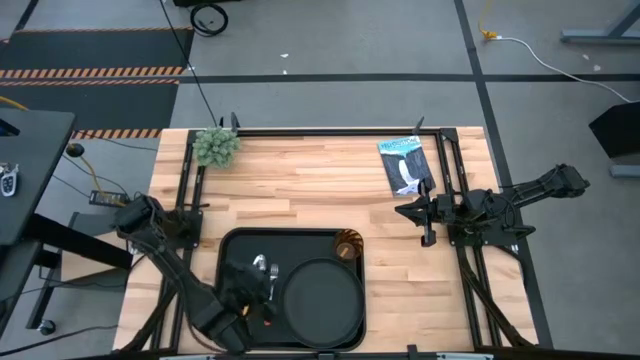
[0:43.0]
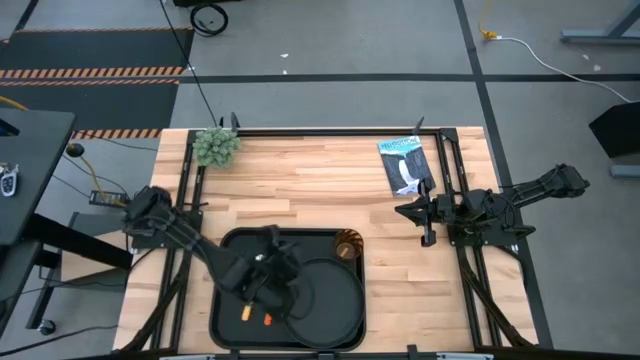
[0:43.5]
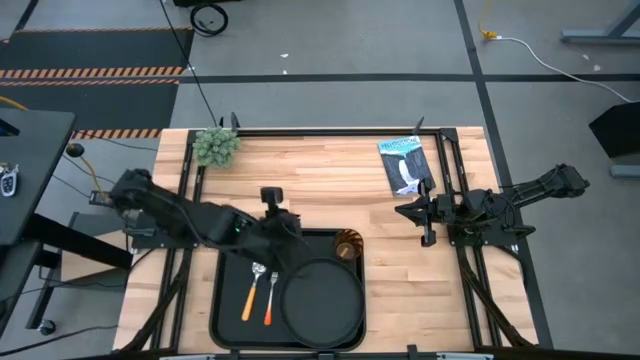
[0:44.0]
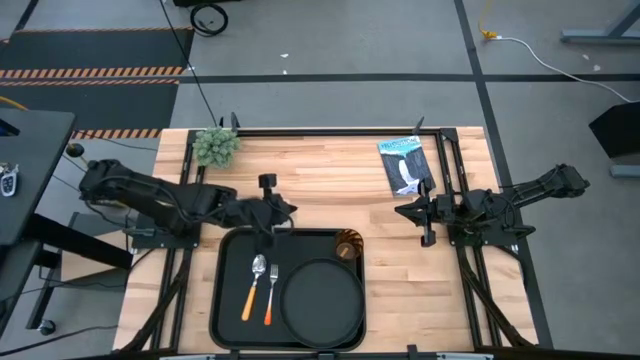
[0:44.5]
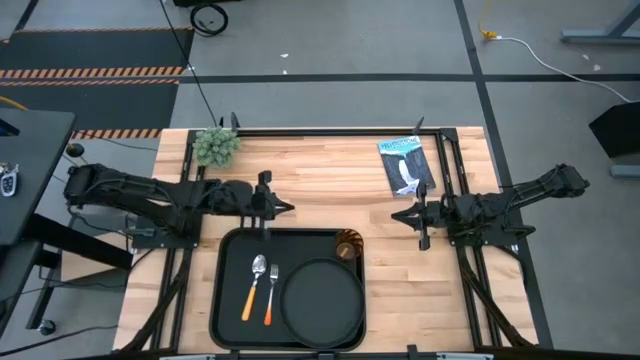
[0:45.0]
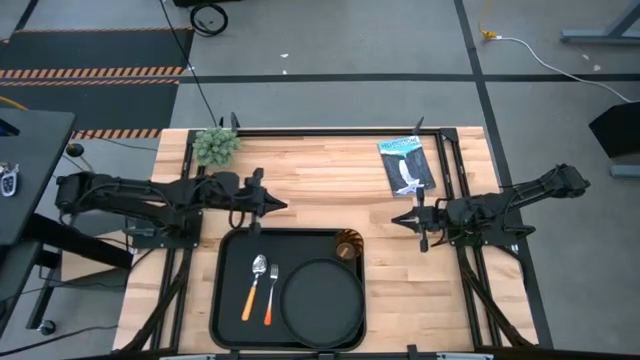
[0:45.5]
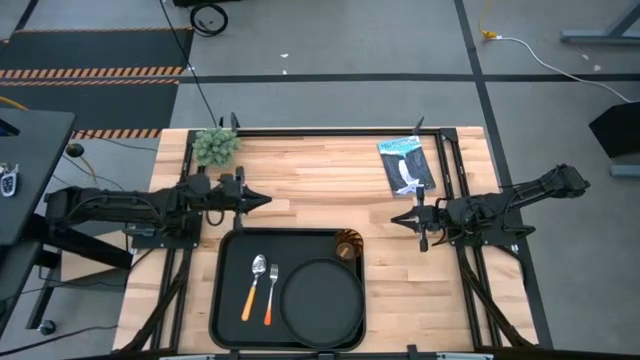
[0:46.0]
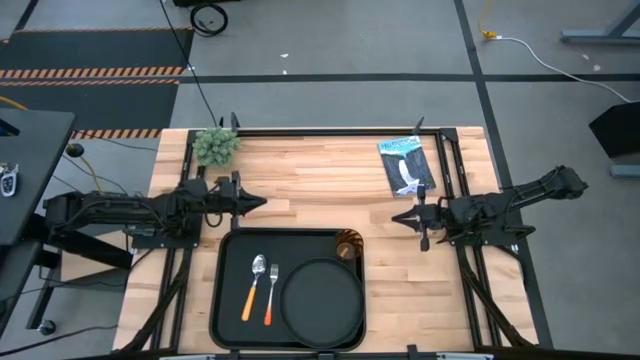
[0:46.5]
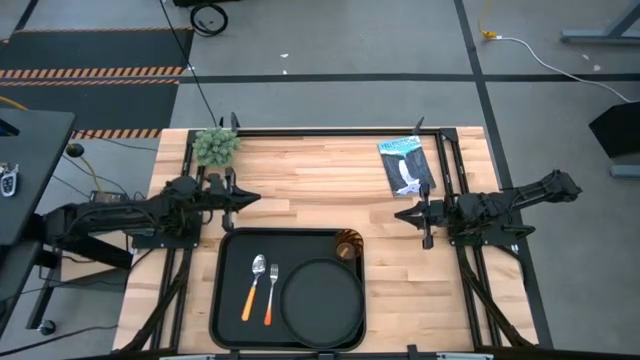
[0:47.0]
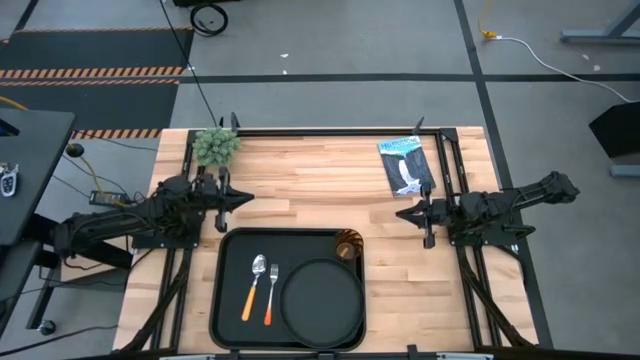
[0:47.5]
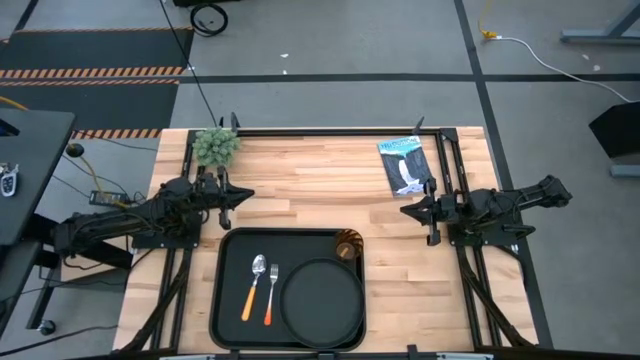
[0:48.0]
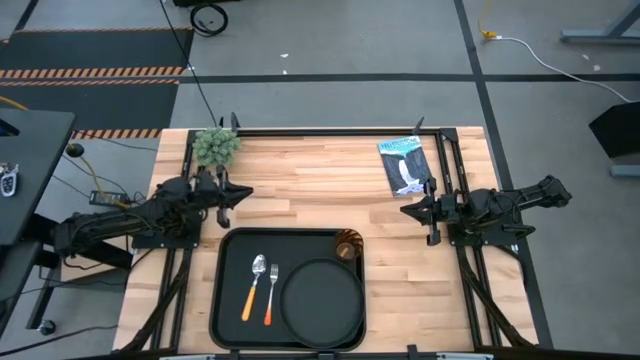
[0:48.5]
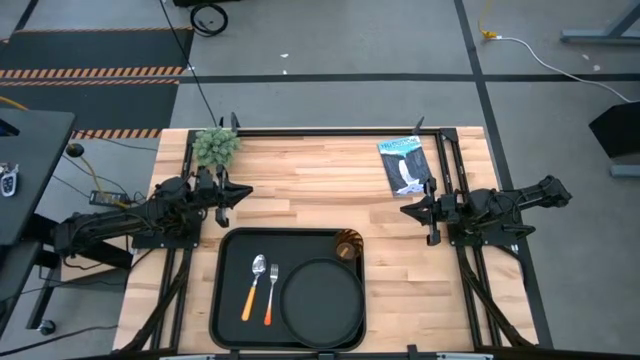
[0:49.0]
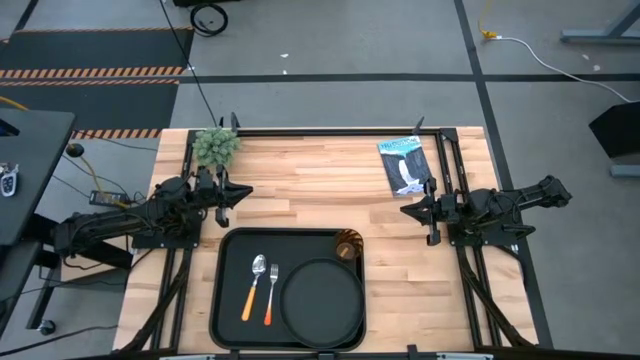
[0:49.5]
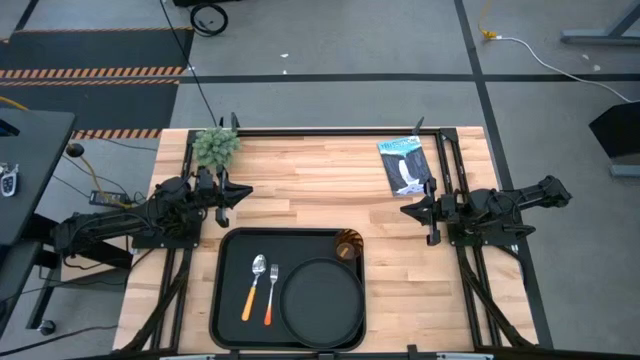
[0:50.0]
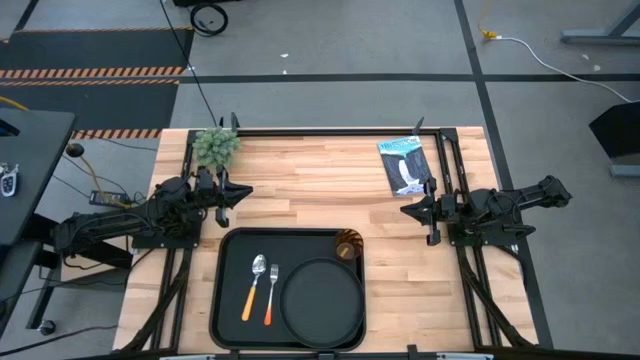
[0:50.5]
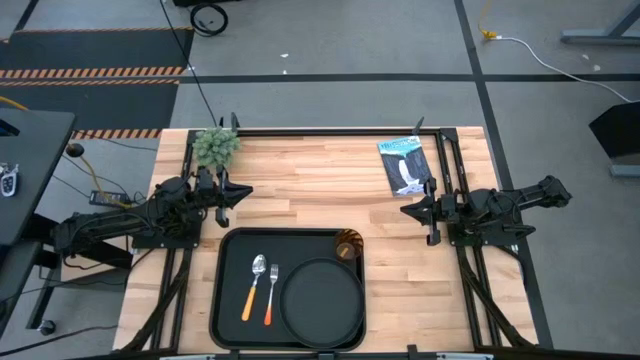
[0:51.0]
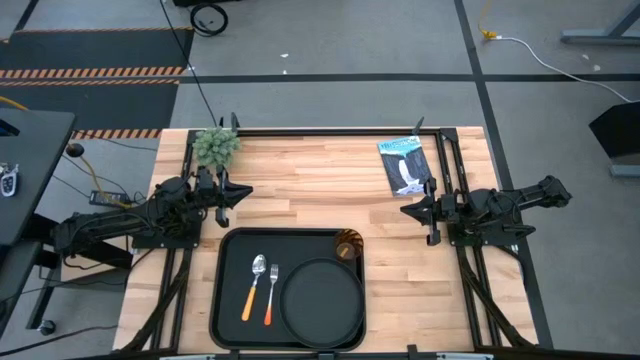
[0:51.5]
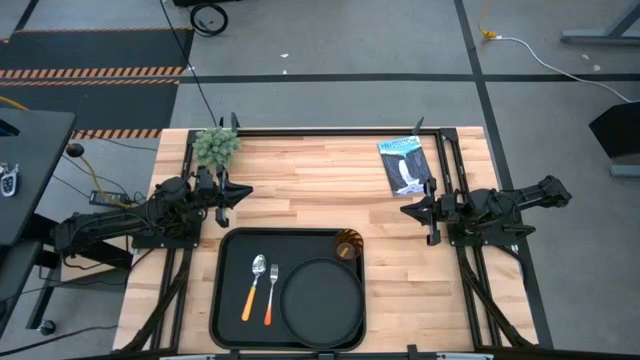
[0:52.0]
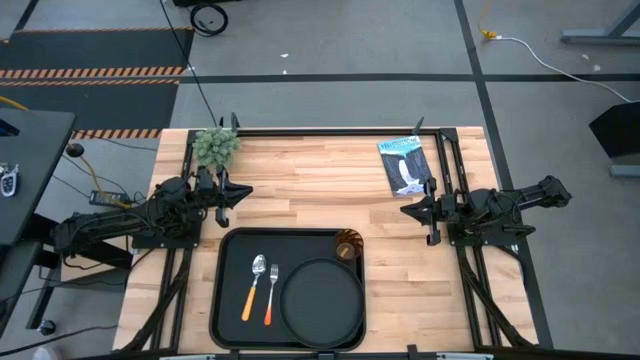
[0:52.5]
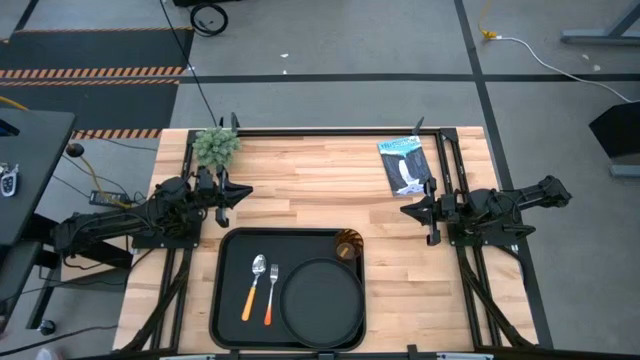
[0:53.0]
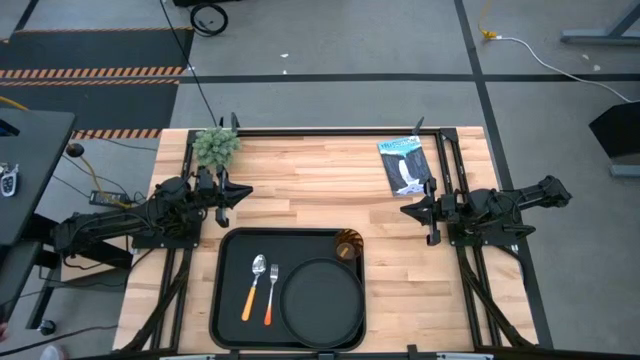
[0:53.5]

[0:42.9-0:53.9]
Task: Pick and place plate/cup/fork/spoon on tray
Return to Home Position

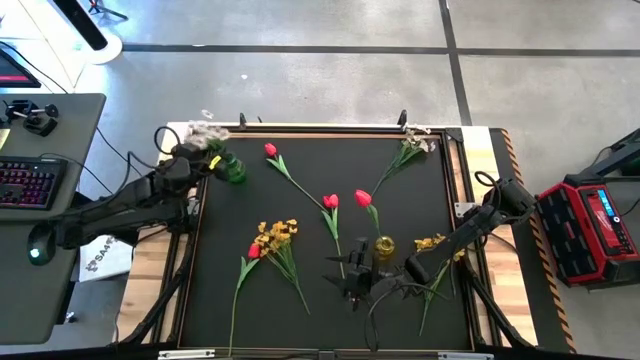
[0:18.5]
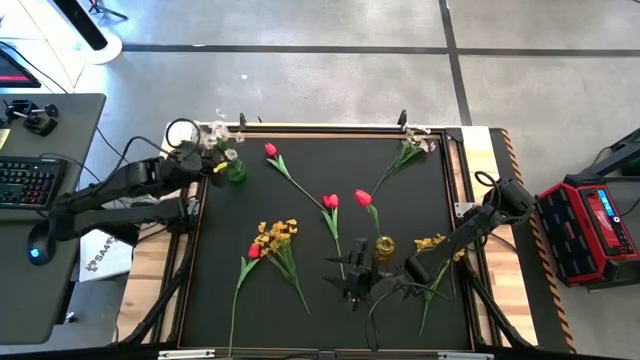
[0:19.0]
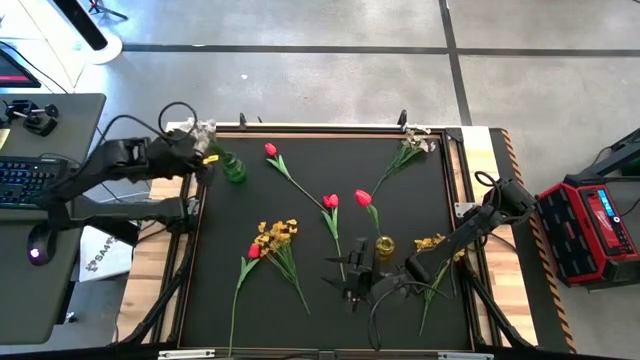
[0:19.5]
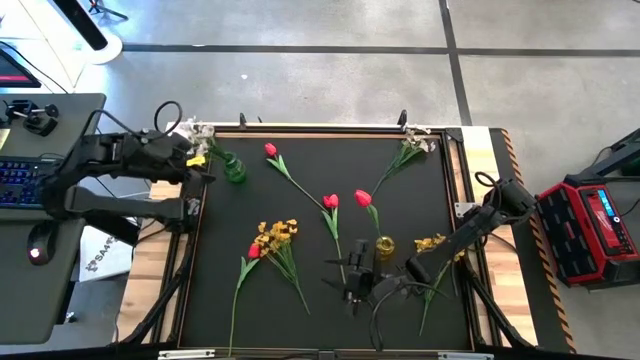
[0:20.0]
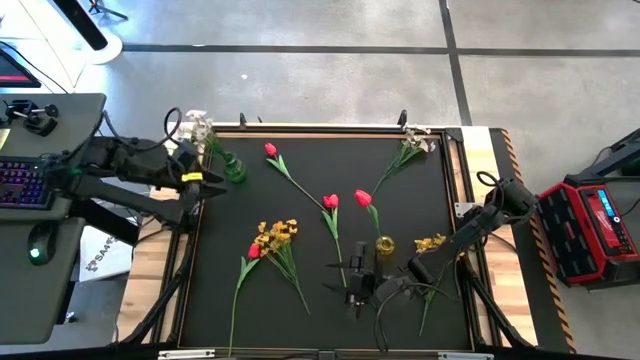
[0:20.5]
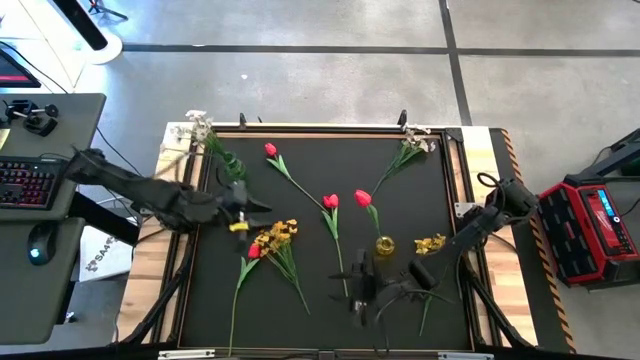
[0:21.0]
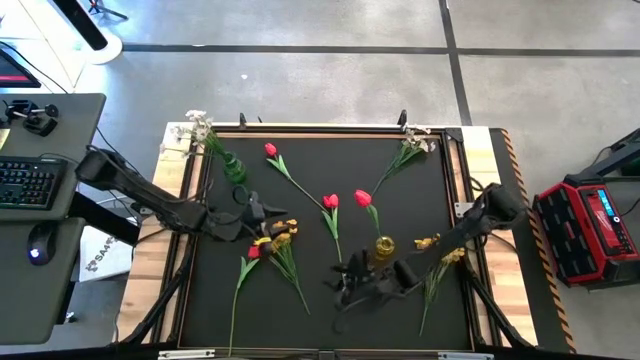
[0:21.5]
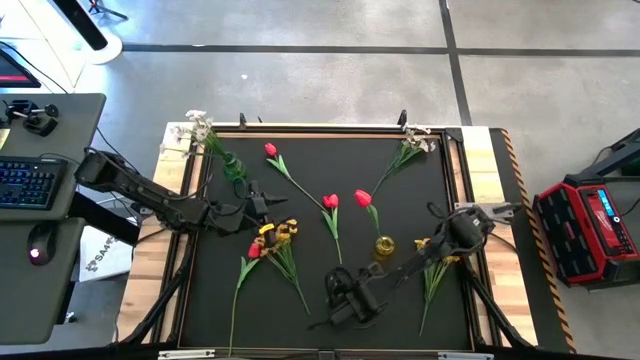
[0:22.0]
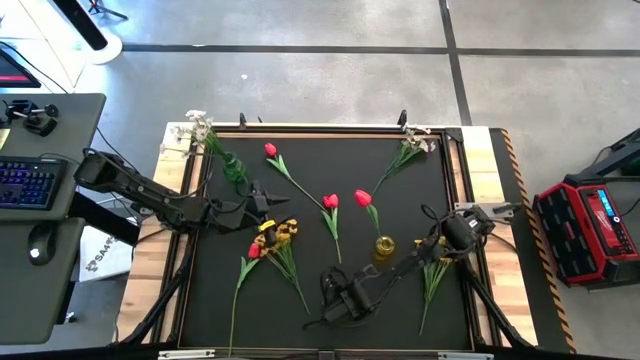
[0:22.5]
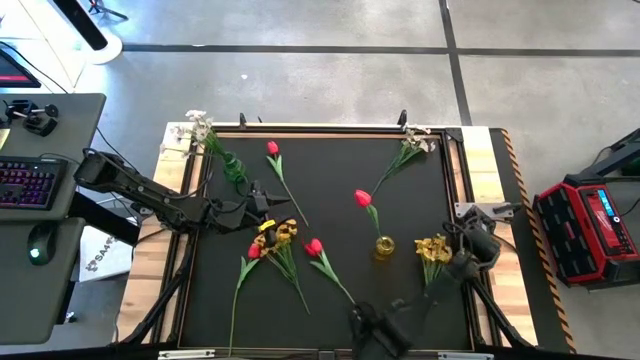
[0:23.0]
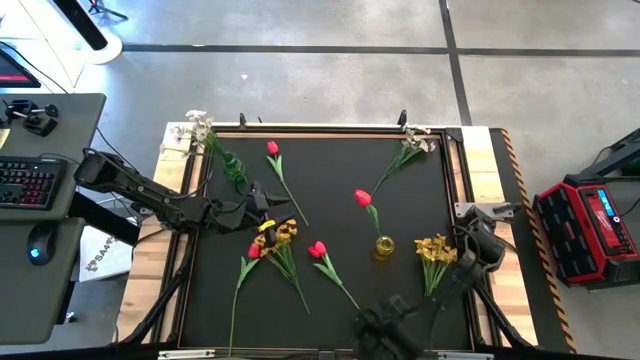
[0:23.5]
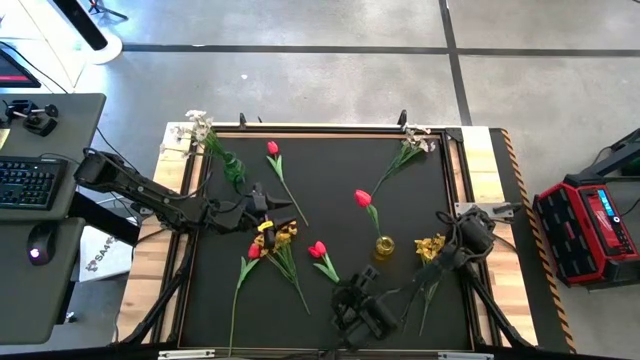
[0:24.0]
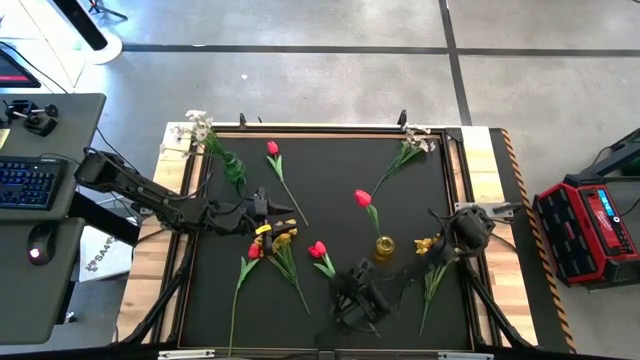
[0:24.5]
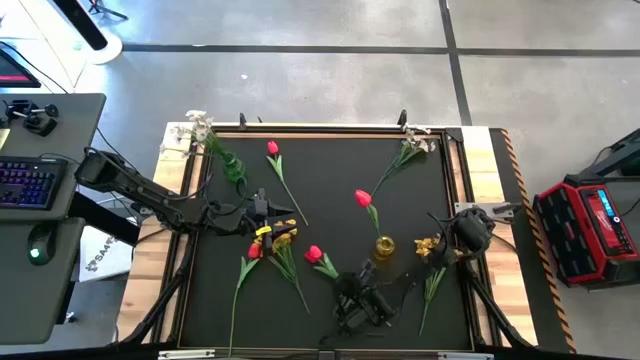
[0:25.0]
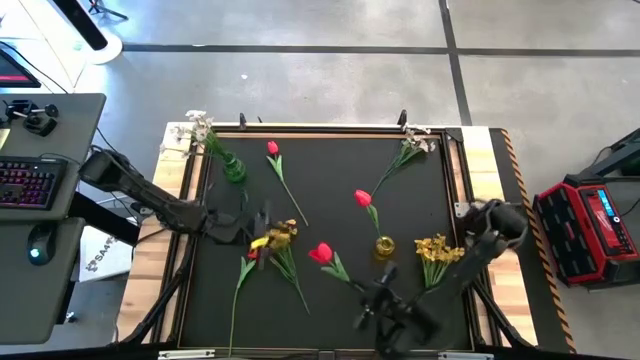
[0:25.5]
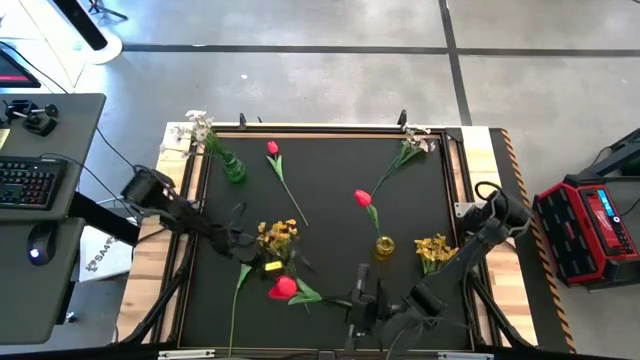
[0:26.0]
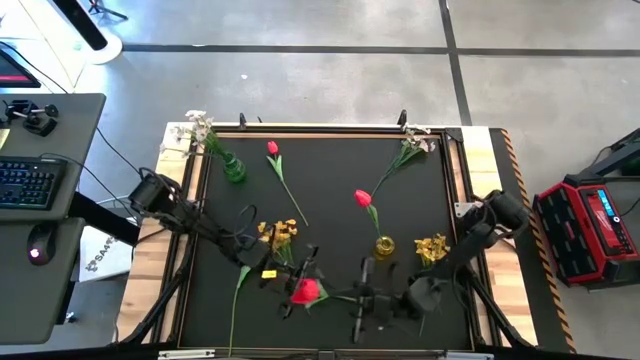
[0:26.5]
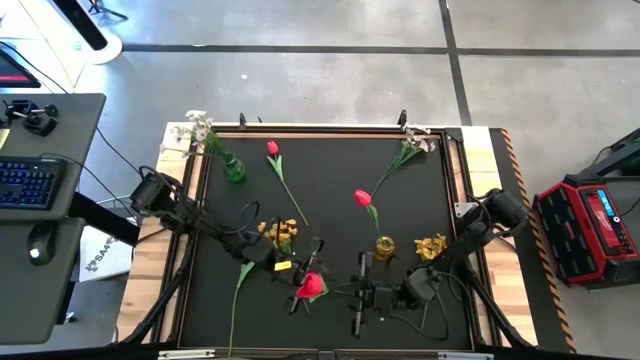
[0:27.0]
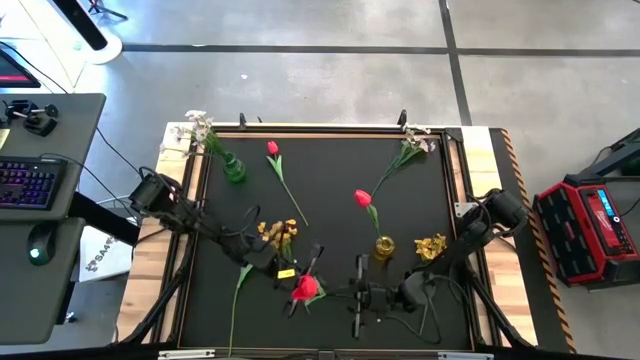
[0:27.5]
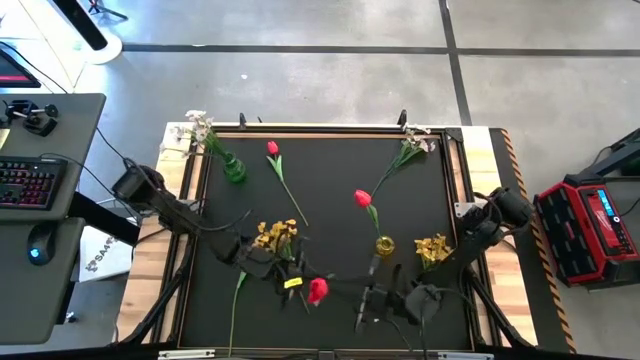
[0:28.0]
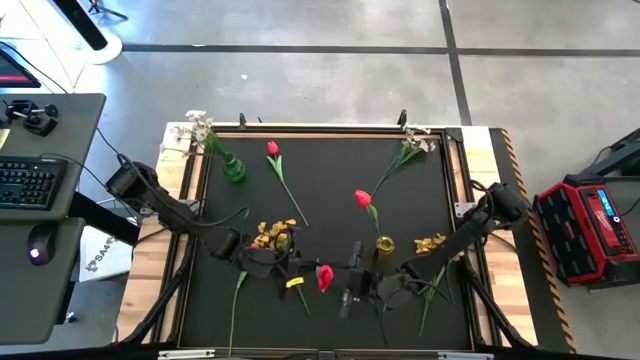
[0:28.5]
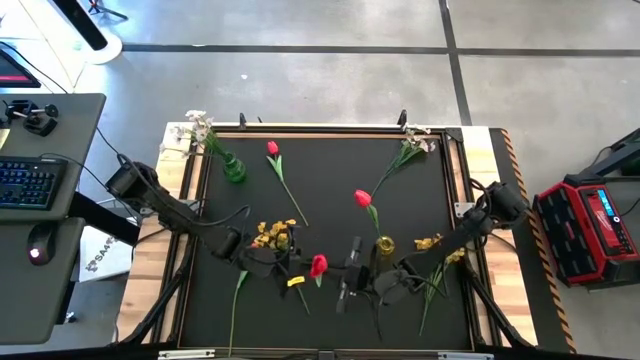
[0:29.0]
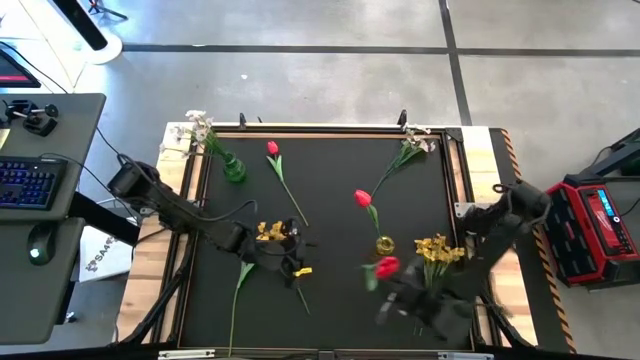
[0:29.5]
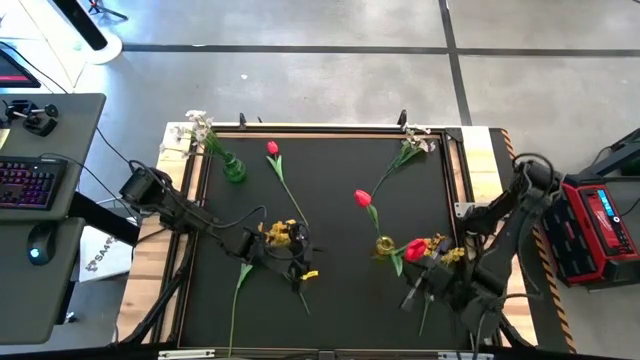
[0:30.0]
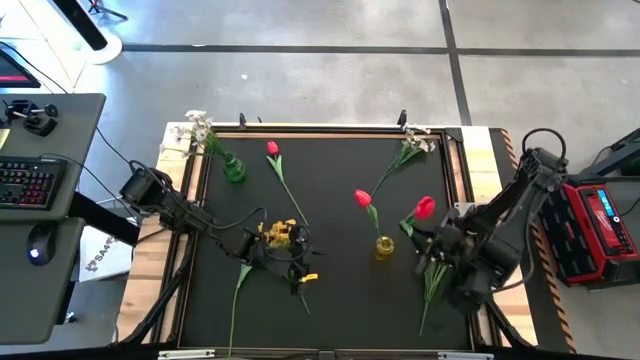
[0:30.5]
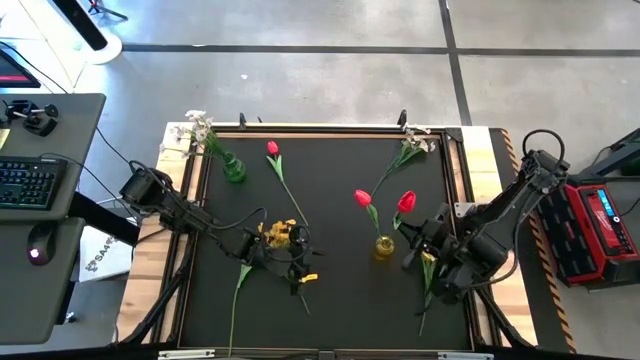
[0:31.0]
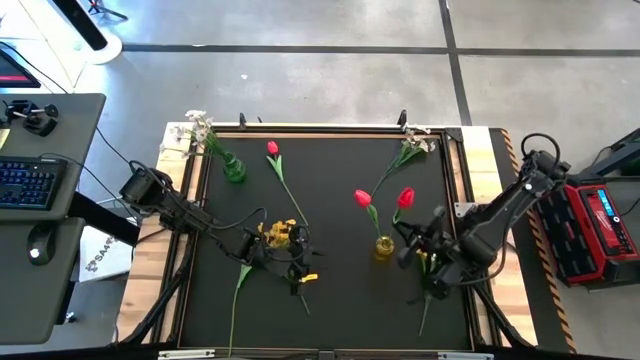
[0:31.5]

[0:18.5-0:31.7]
Task: Sort flowers into vase by color
Put the bottom right red flower into the yellow flower vase
